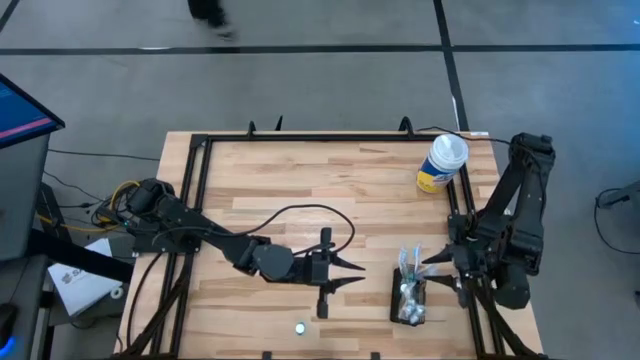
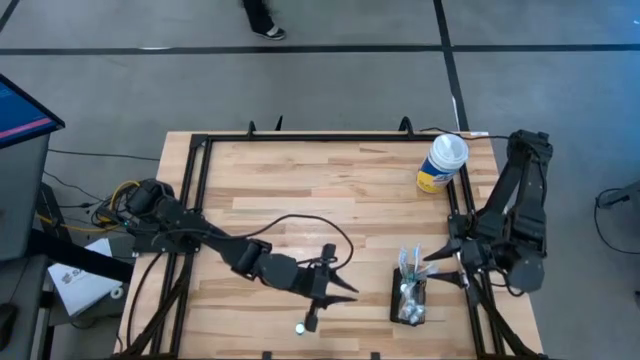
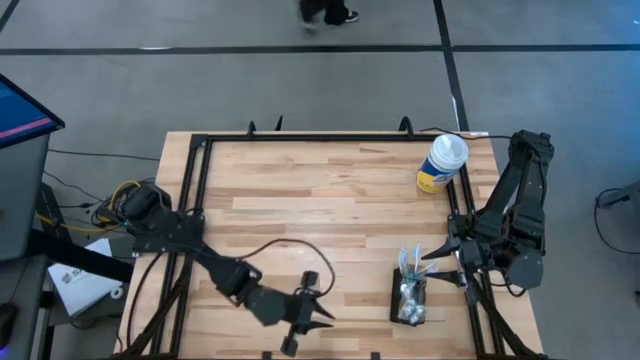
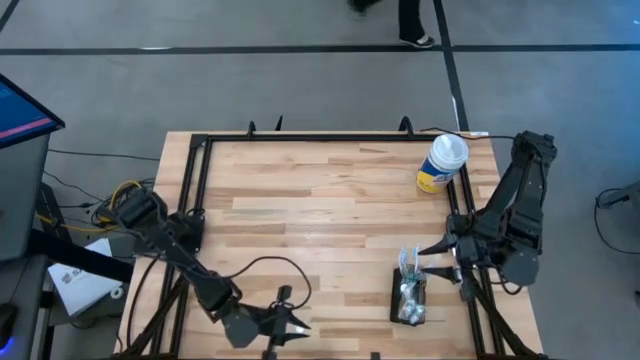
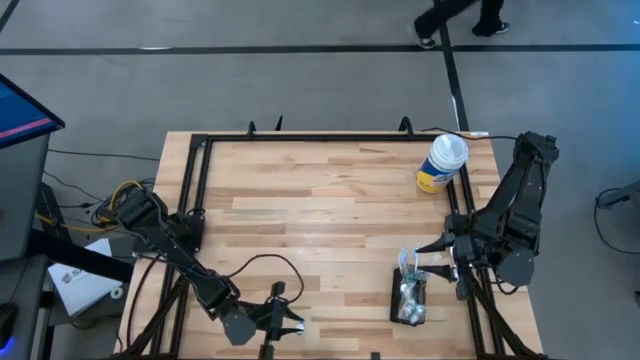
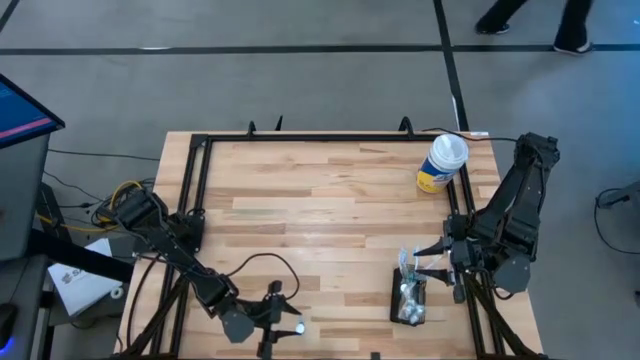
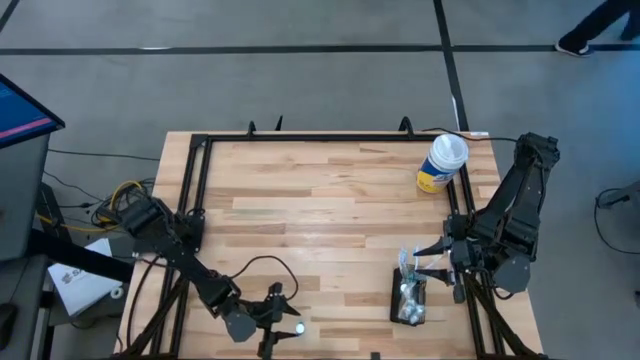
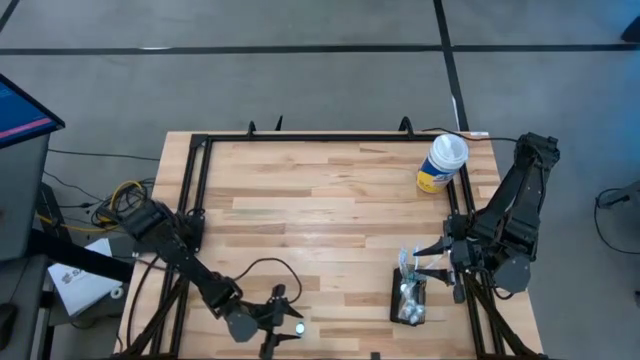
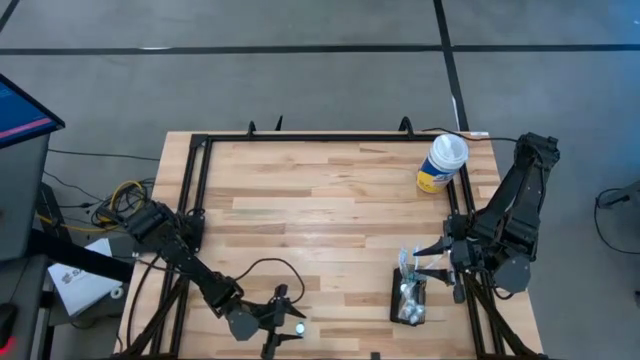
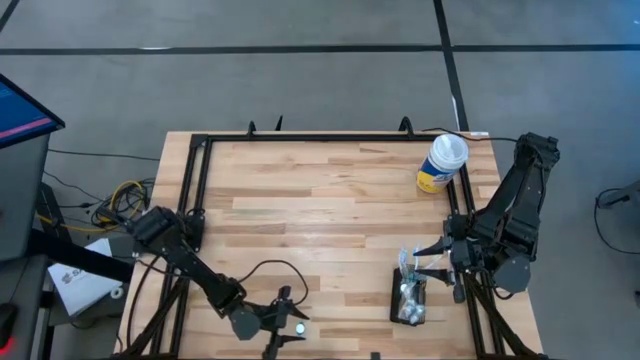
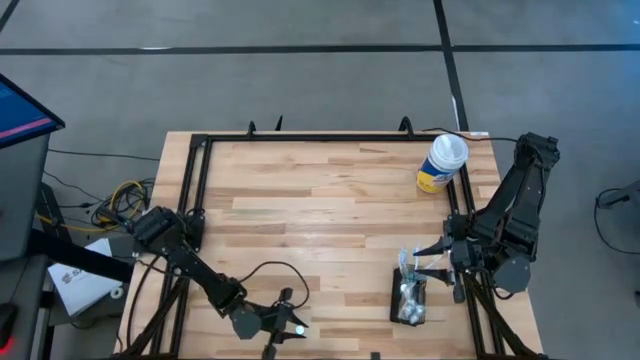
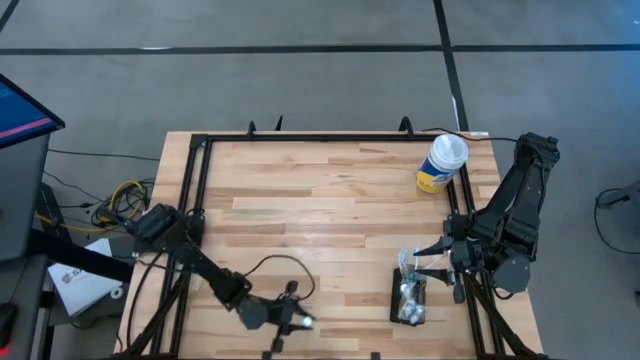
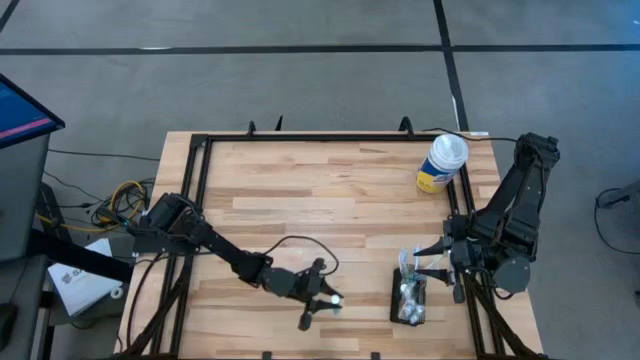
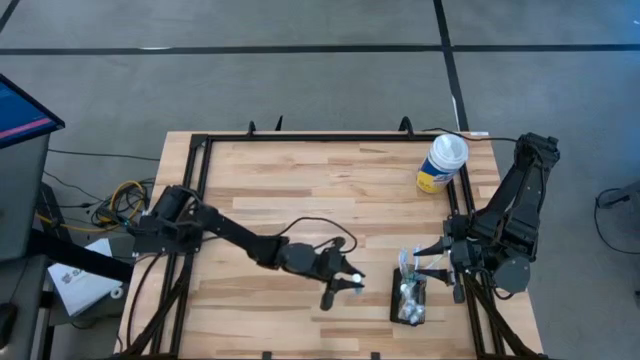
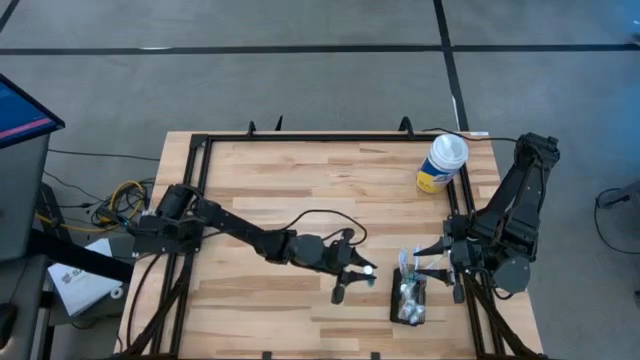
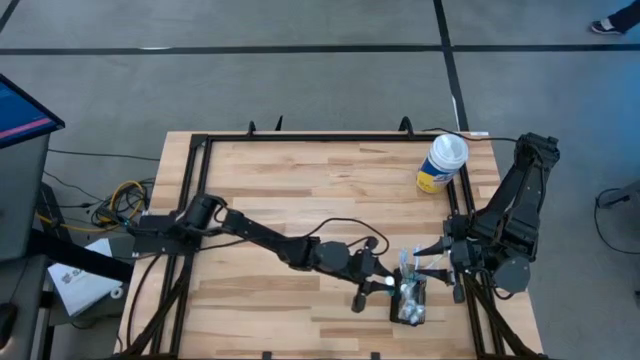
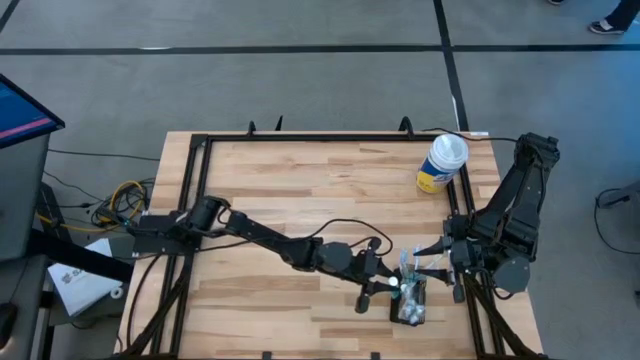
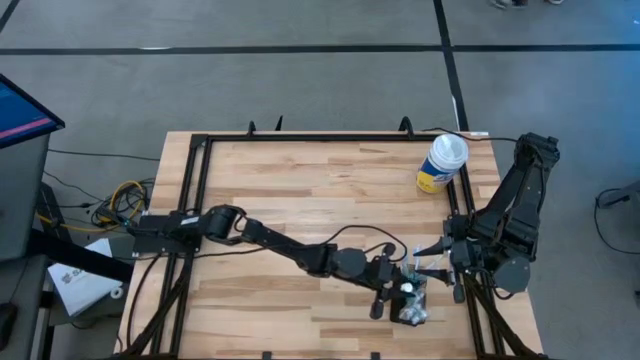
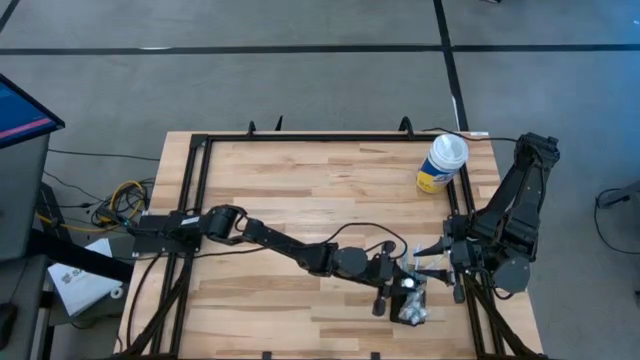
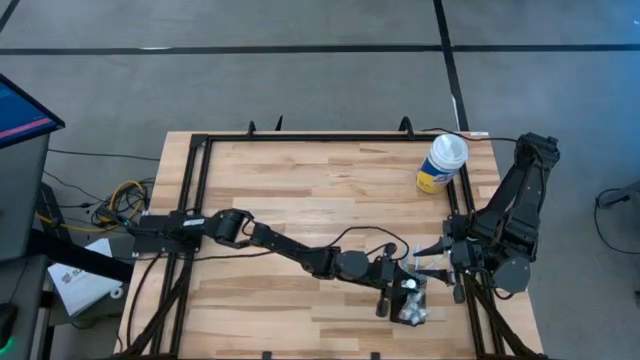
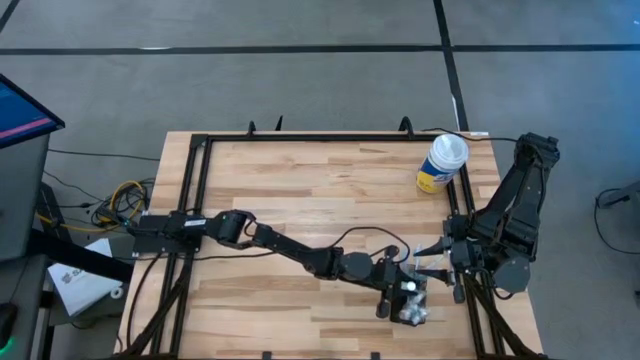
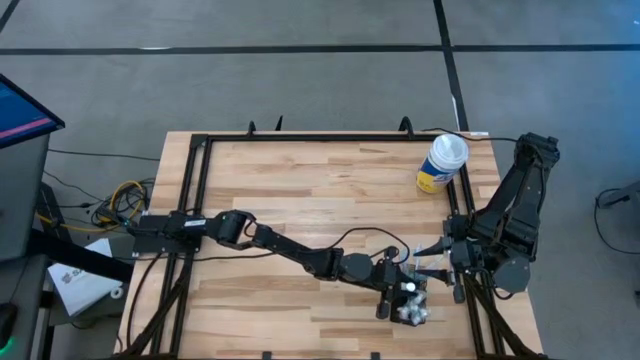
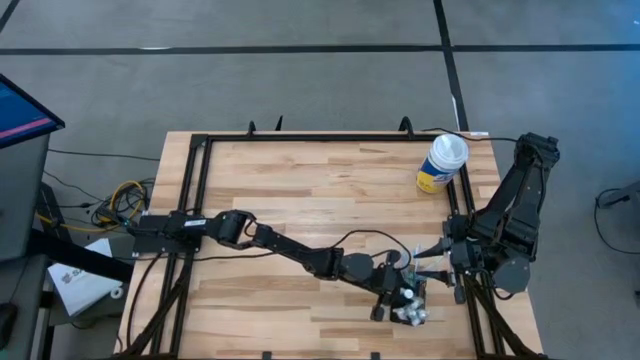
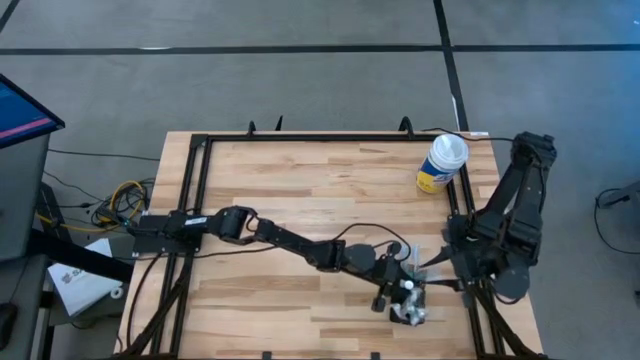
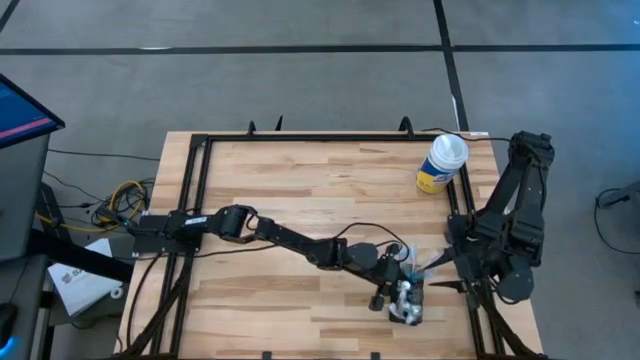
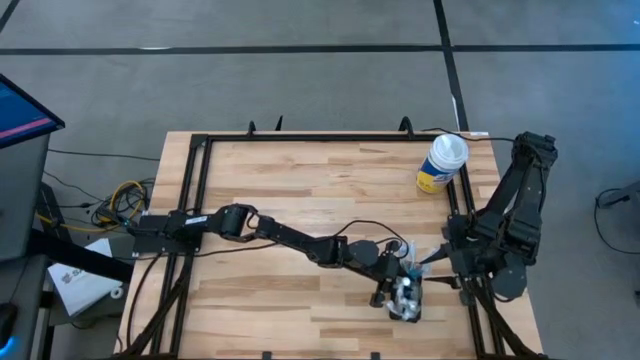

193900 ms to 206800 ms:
Task: Pick & Place toothbrushing station
Put the blue mouthwash into the black wire organizer

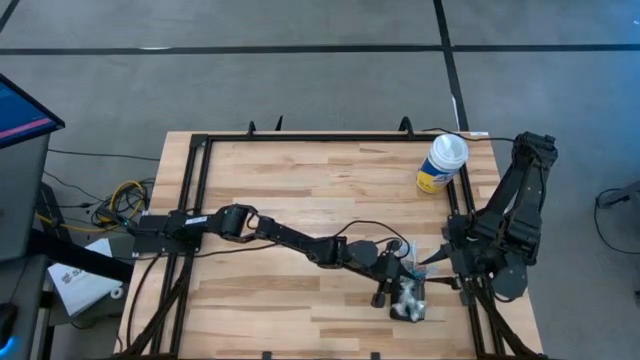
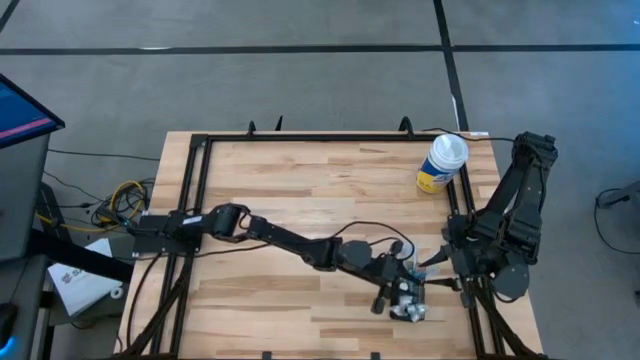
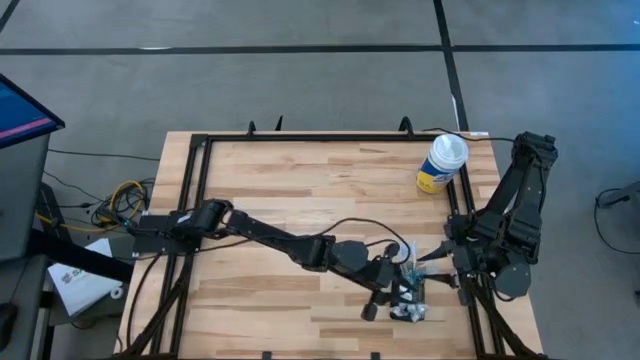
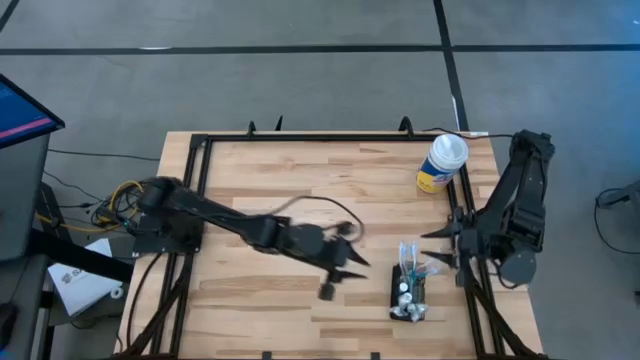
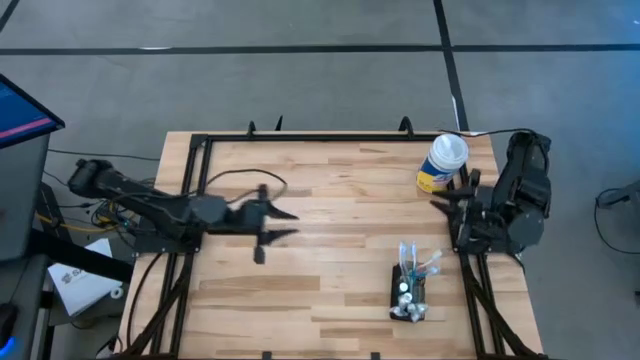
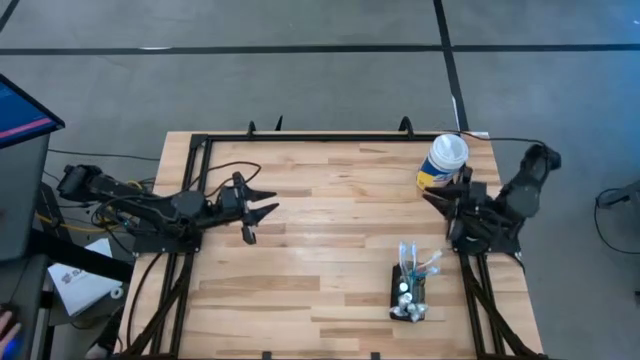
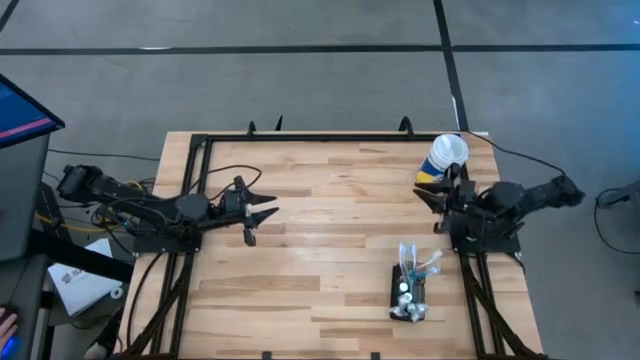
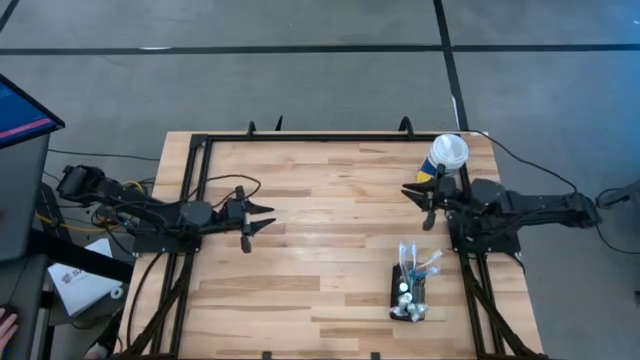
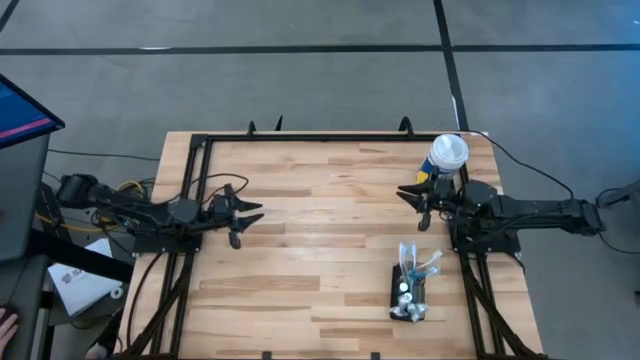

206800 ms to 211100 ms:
Return to Home Position

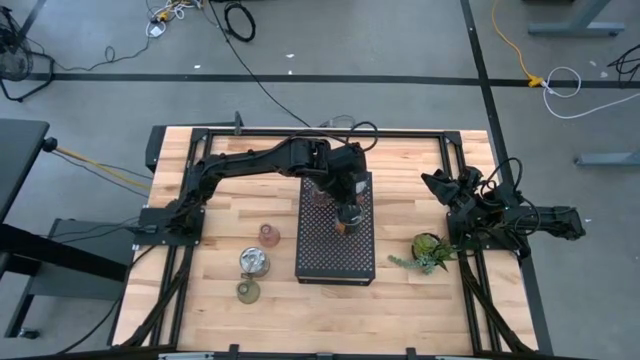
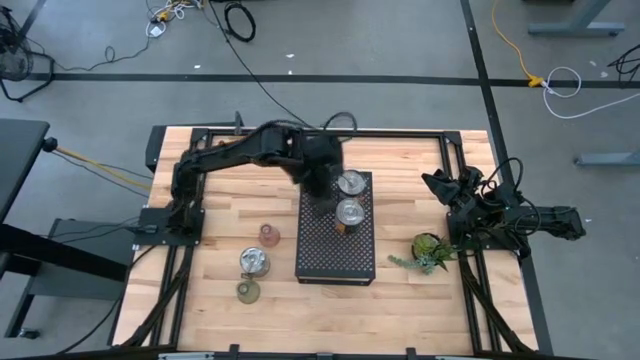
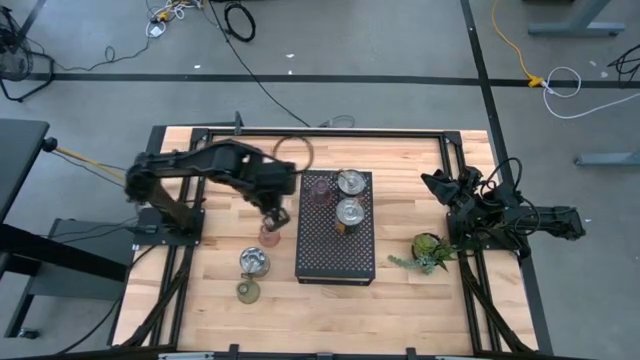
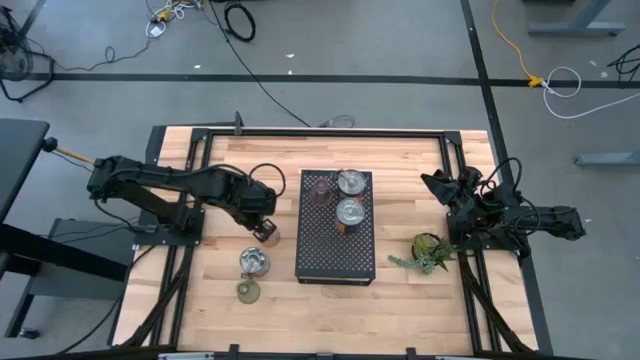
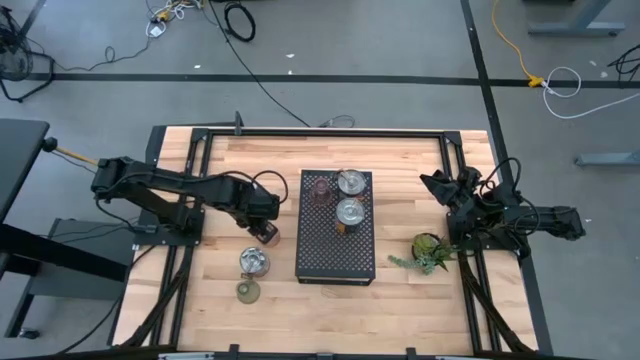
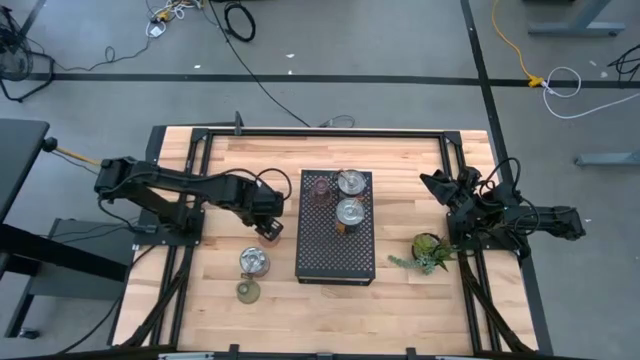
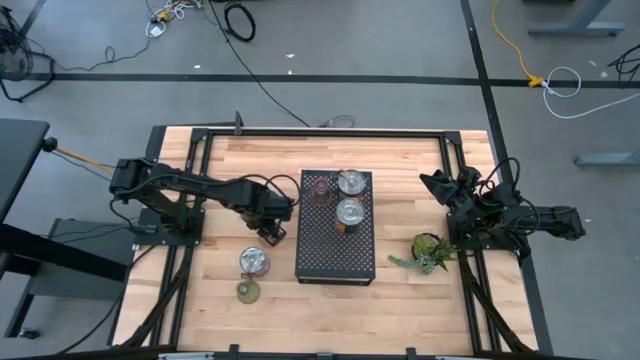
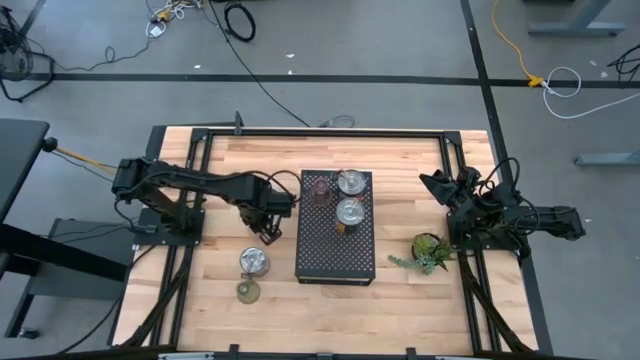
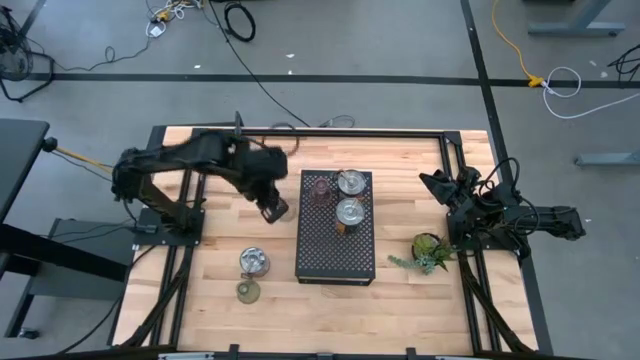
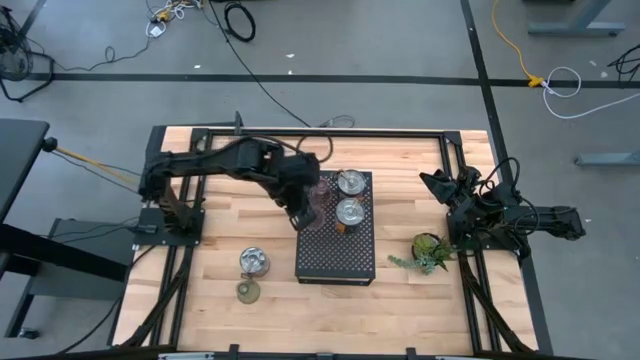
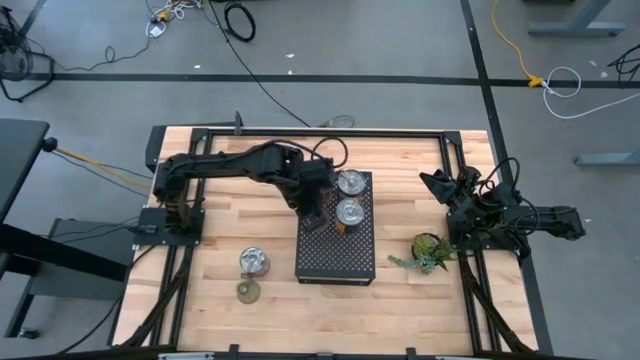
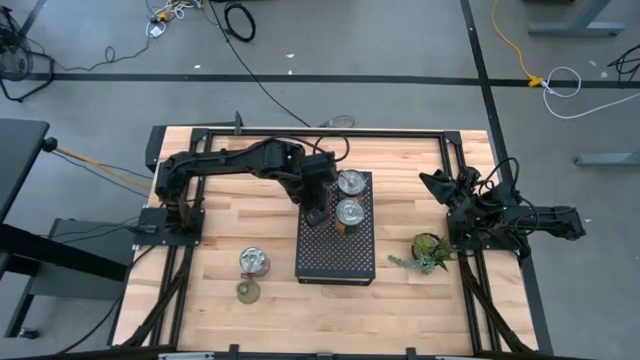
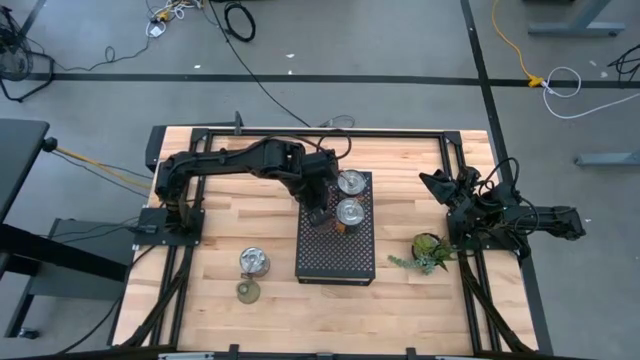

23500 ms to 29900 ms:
Task: Pick & Place candle stick holders
Put the pink glass candle holder on the shelf
